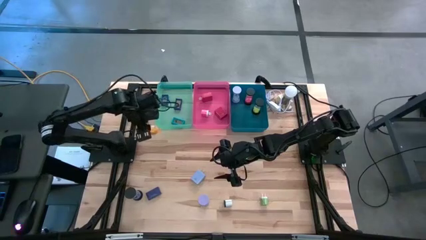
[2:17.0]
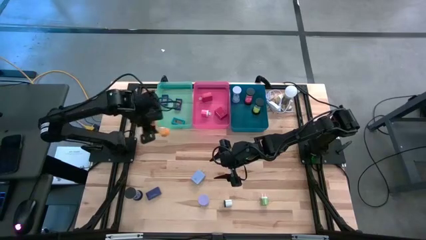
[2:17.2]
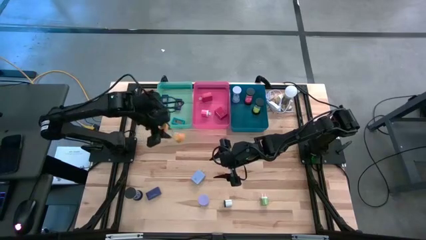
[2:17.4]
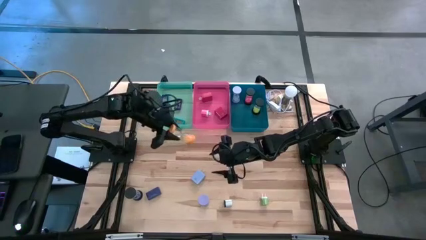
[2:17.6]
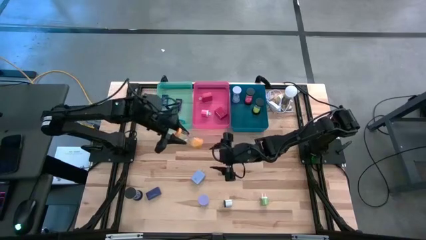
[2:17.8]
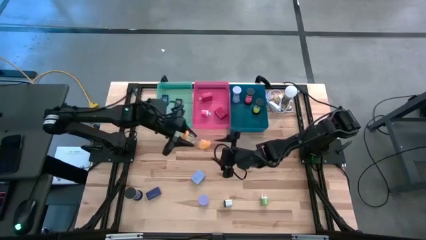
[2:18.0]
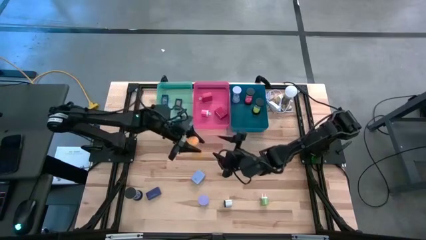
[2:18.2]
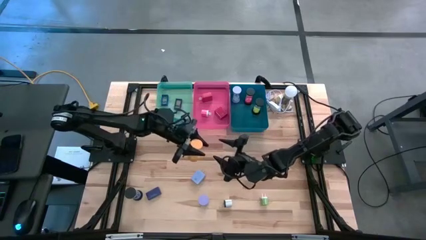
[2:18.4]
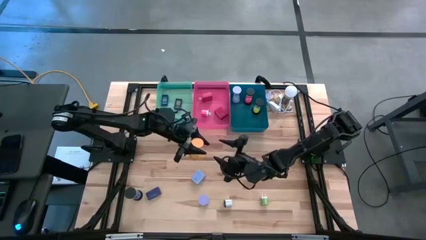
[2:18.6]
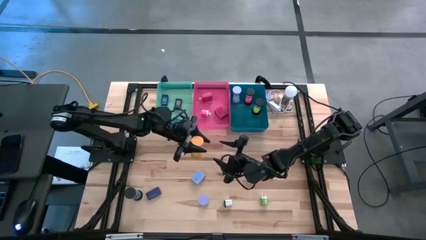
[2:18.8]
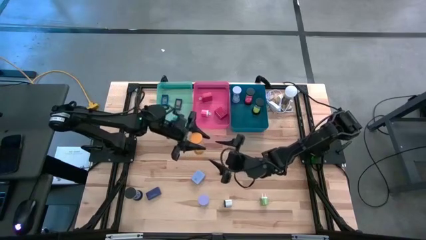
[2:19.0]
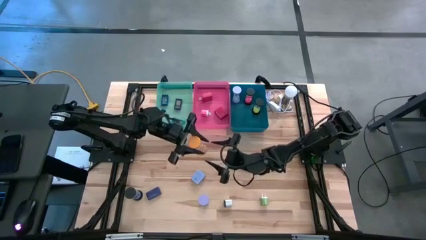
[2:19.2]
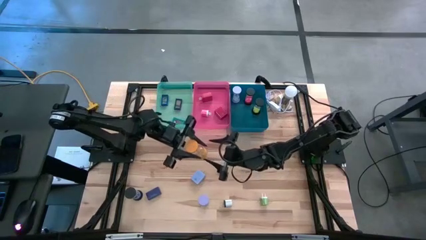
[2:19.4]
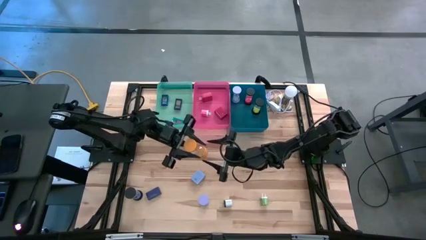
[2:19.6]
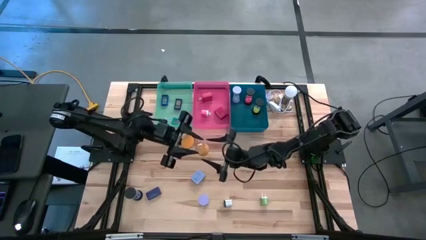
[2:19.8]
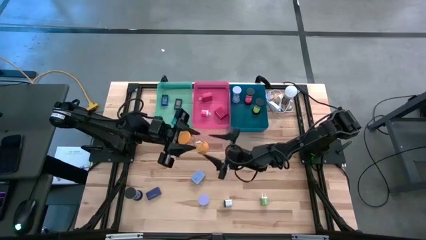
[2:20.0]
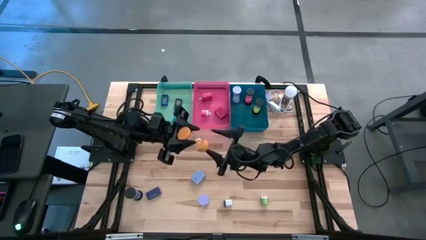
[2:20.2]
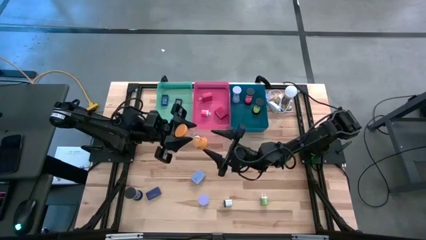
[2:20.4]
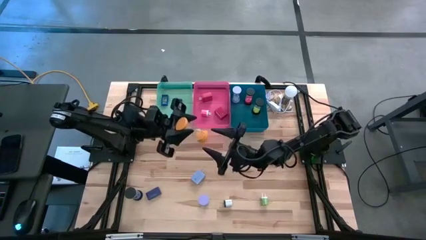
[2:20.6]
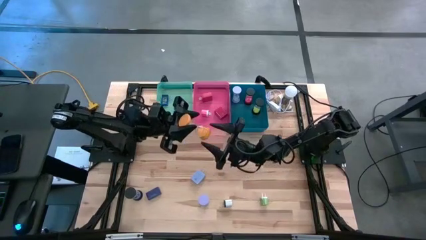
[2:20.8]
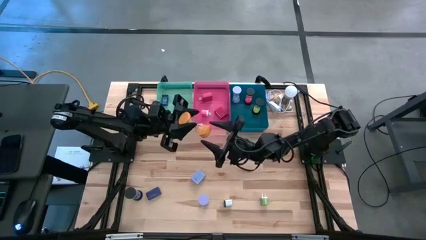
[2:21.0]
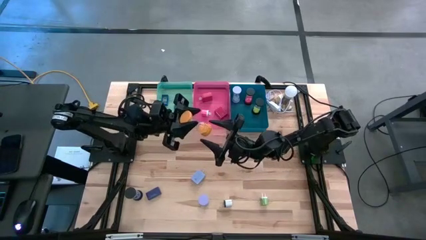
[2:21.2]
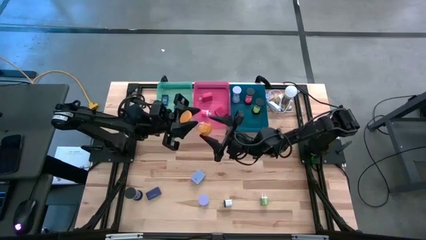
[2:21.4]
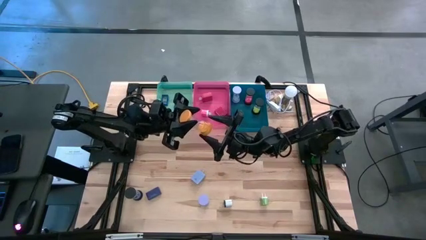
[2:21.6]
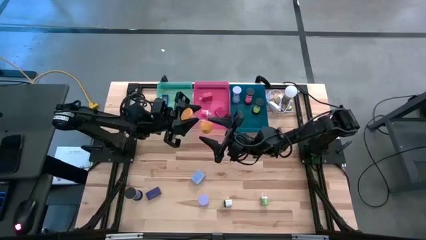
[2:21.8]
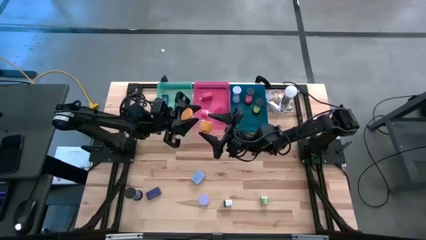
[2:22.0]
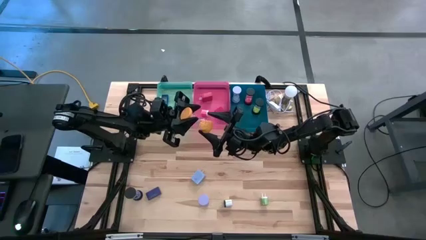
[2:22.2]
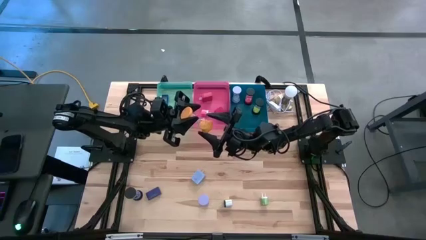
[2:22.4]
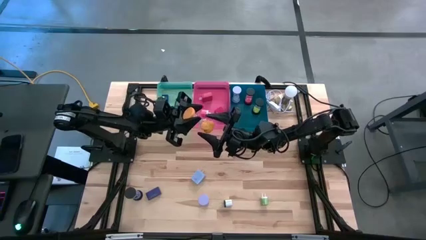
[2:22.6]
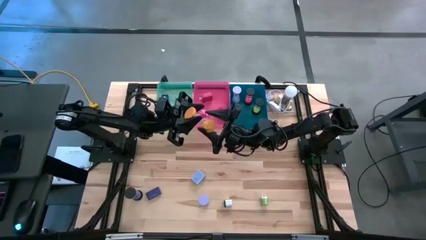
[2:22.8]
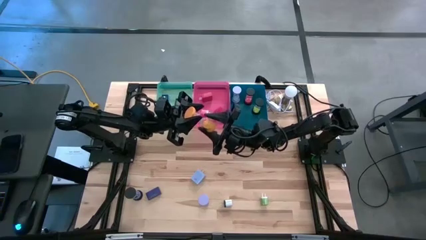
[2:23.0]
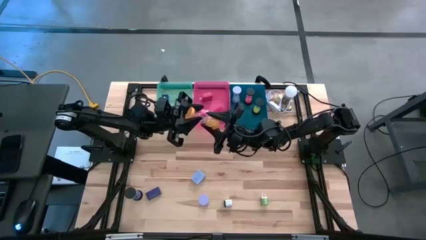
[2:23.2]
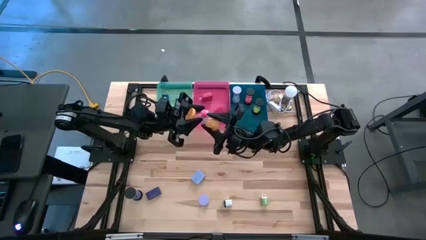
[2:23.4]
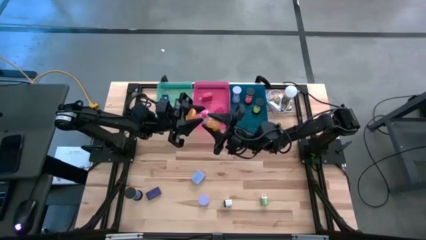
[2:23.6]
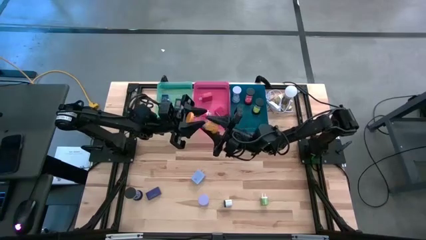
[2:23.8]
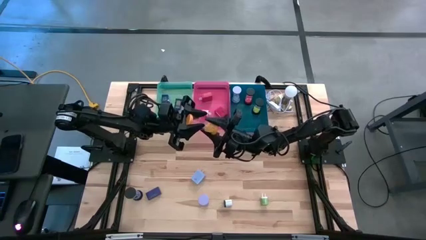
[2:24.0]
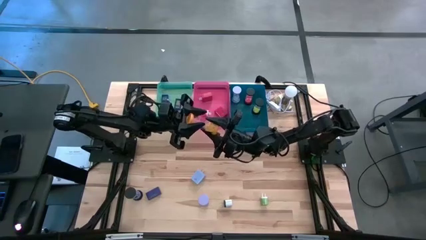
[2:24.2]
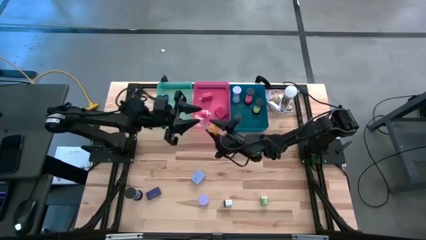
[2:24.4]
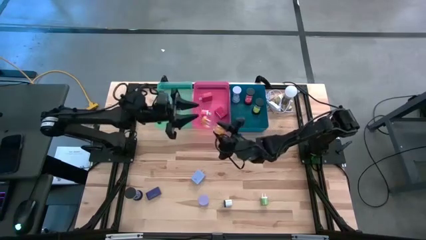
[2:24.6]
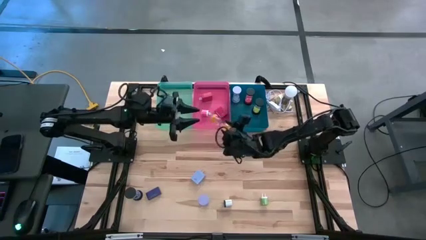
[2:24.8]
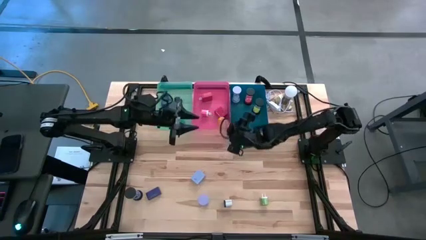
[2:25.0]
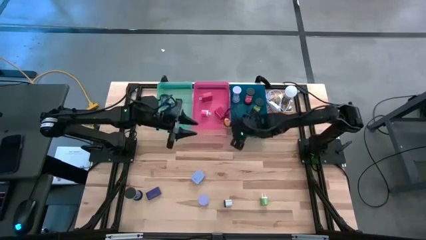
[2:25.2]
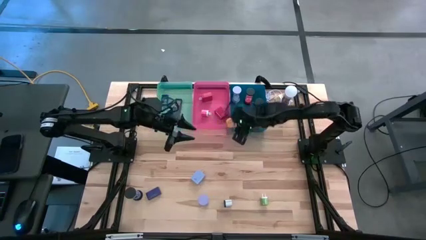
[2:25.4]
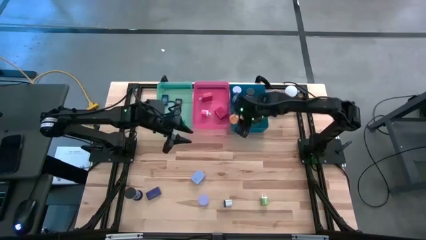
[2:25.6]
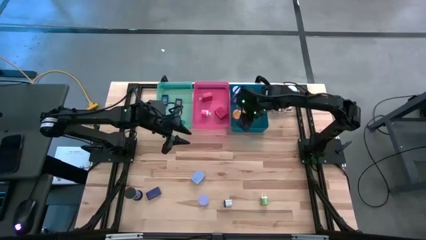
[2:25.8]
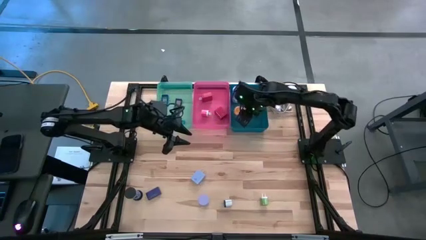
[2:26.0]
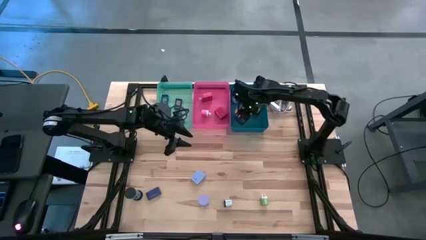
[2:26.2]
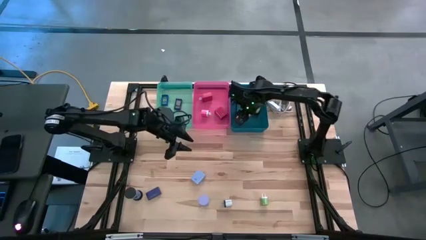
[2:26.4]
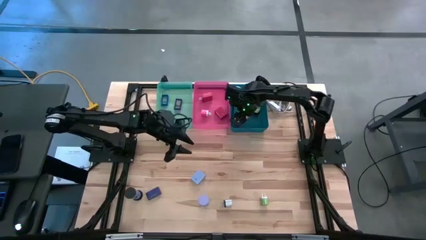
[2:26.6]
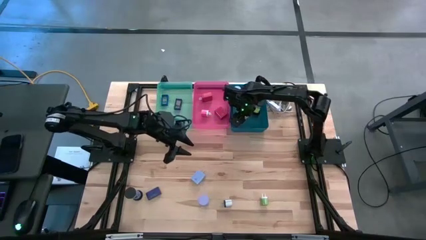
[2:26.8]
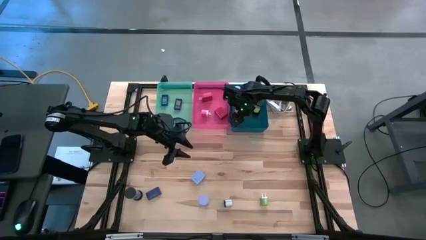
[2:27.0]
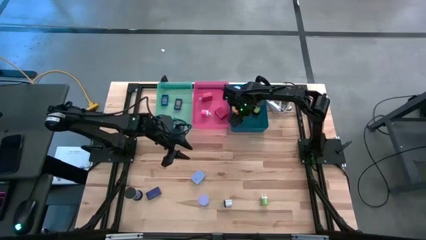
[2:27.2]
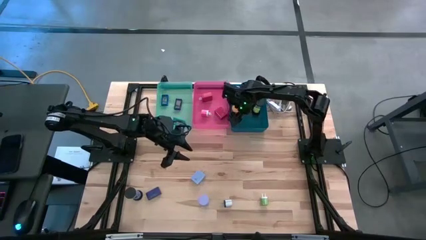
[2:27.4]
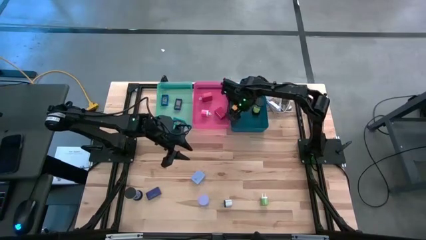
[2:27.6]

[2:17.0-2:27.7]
Task: Pick & Place Office items
Put the yellow hourglass into the dark blue bin

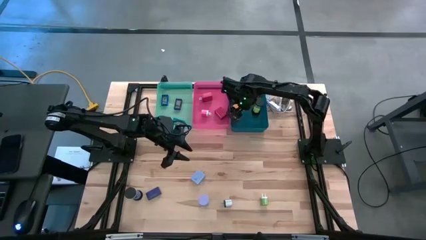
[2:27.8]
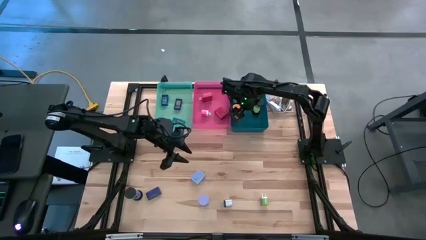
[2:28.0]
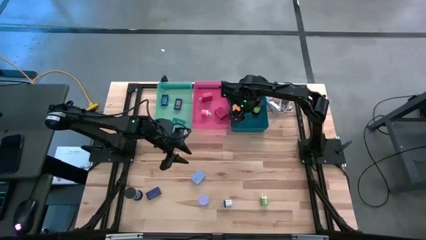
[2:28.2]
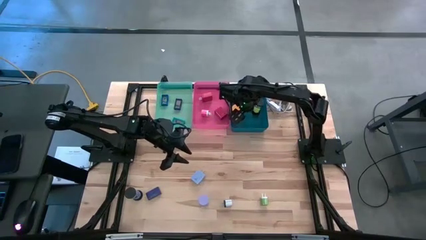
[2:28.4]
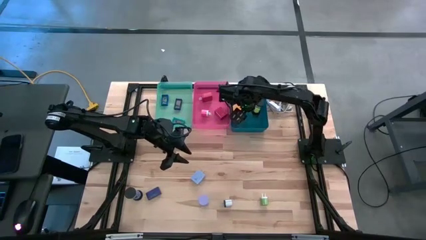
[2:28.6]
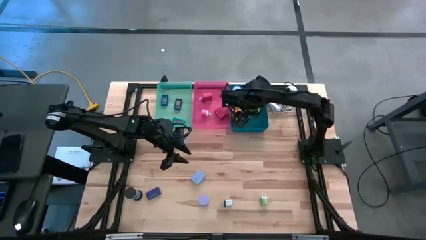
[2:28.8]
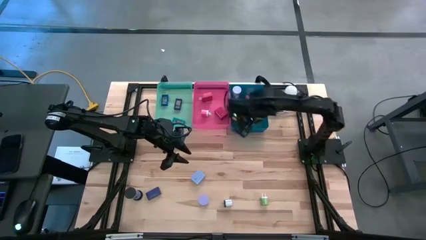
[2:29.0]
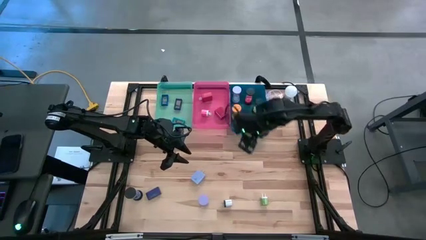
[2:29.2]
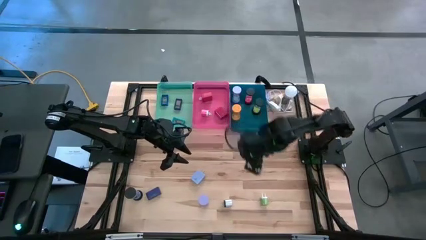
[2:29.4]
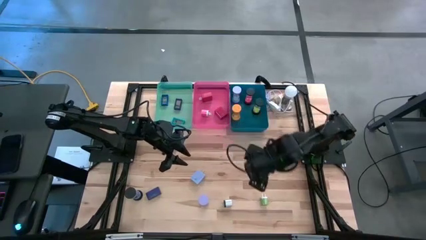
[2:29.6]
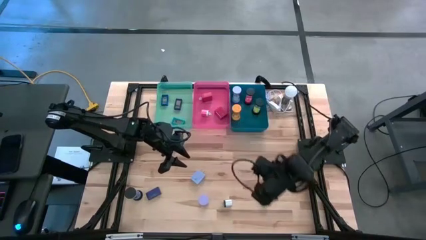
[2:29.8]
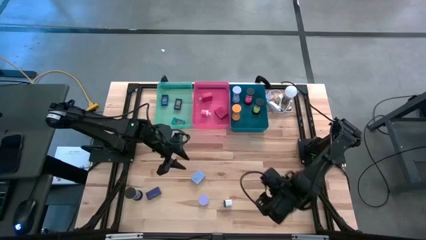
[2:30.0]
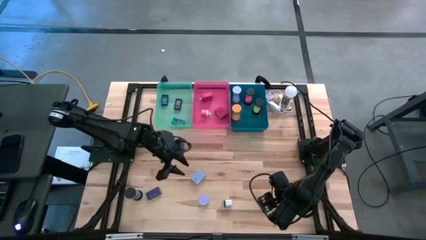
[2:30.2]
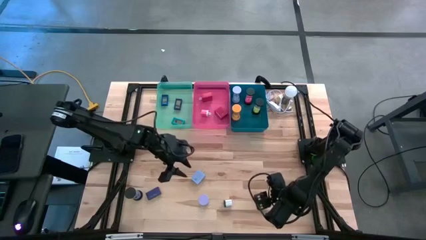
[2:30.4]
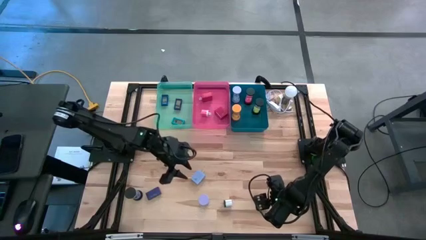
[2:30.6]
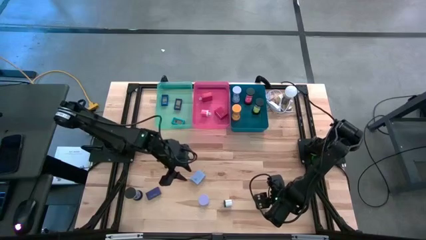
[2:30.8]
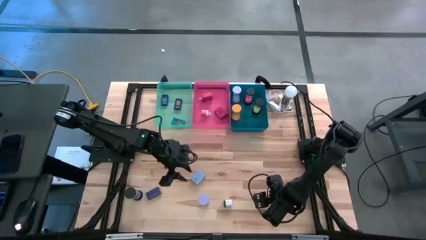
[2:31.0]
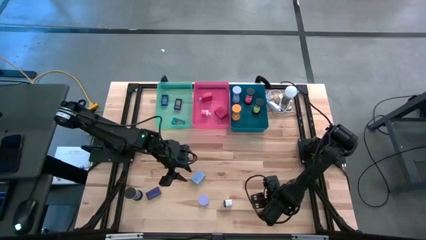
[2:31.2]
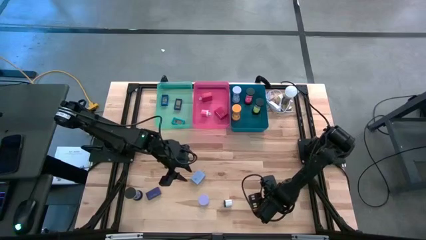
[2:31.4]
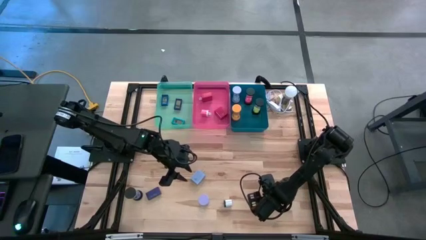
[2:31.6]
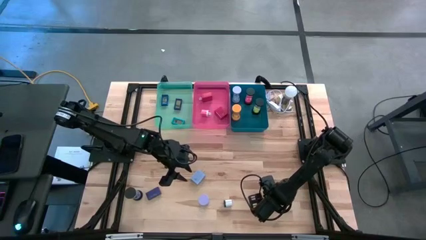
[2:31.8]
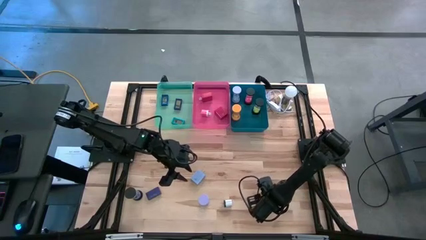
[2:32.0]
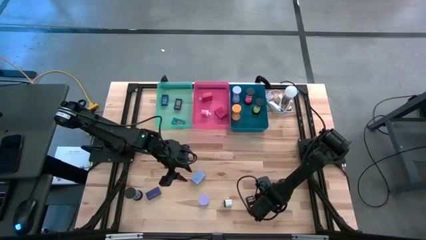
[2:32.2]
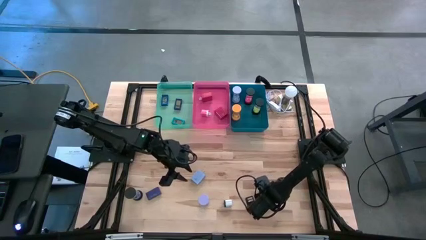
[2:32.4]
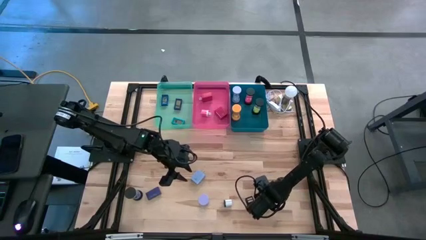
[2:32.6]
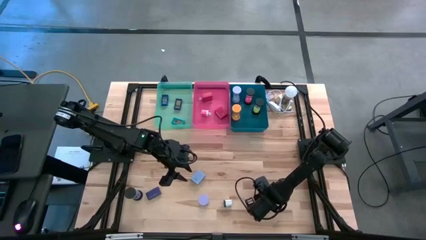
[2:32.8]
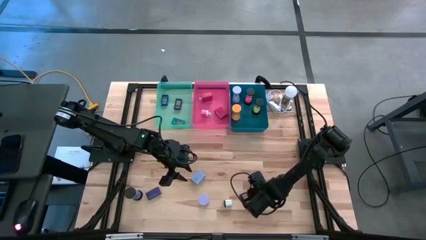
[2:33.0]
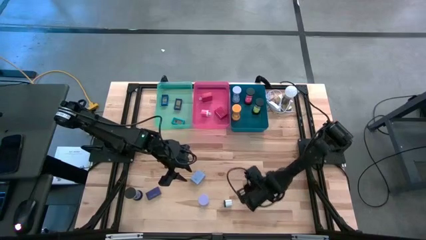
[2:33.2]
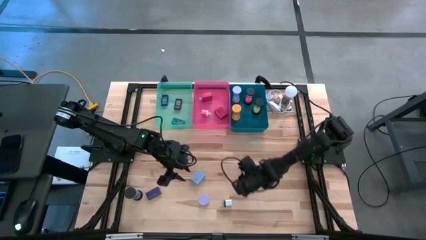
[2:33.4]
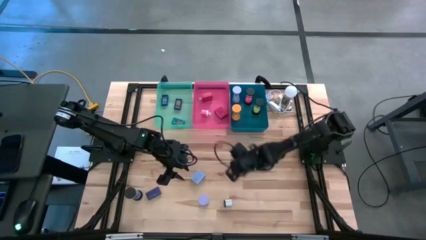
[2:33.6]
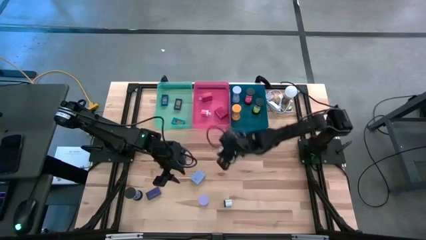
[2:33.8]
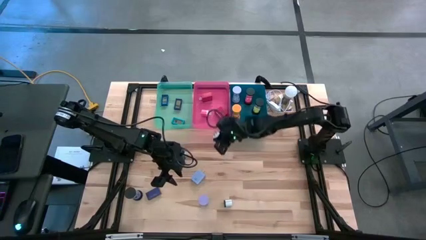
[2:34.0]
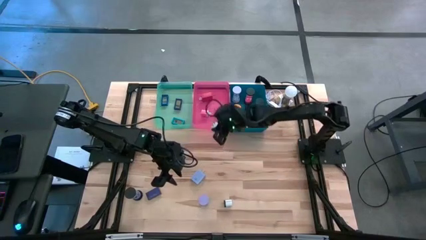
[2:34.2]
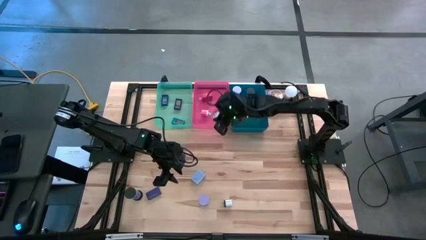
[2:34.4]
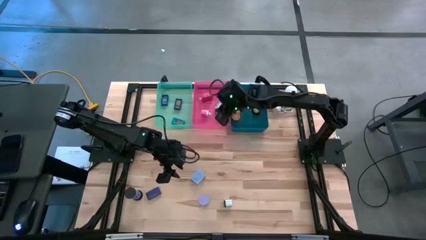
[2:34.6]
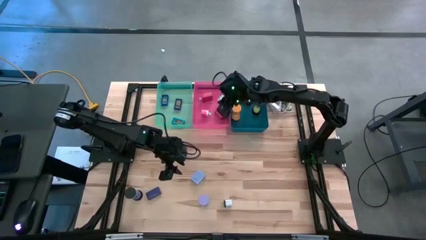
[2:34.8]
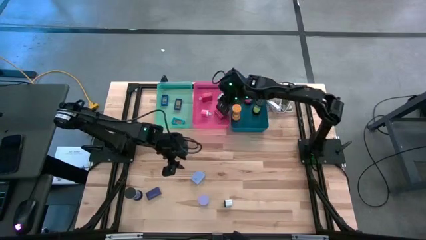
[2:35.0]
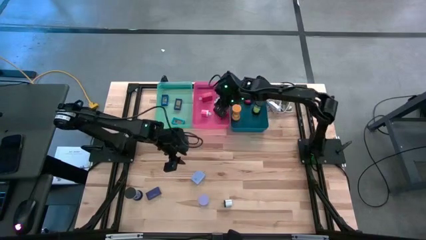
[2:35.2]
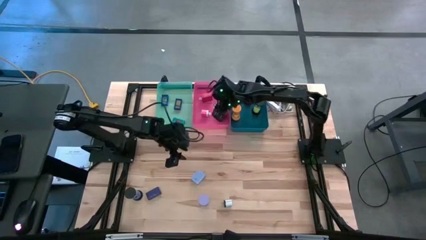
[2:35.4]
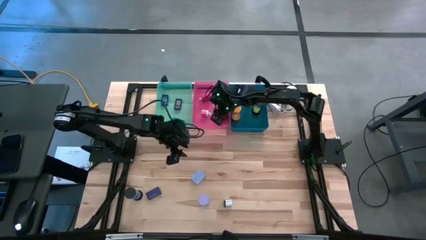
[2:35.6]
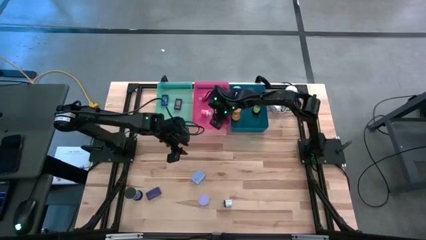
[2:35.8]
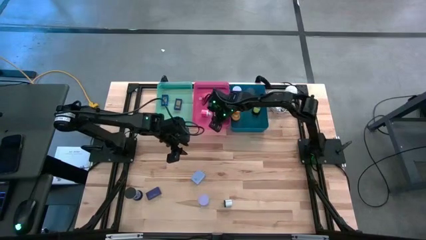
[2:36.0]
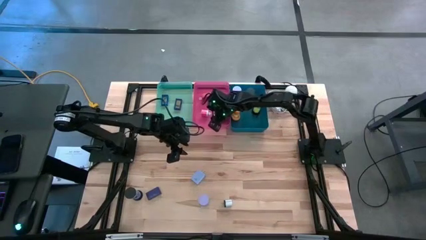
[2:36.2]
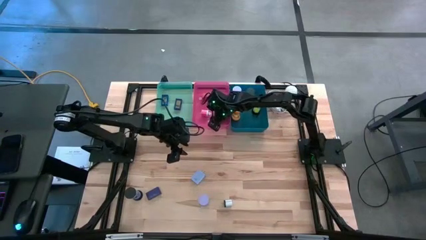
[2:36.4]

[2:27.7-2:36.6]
Put the small green adapter into the red bin
